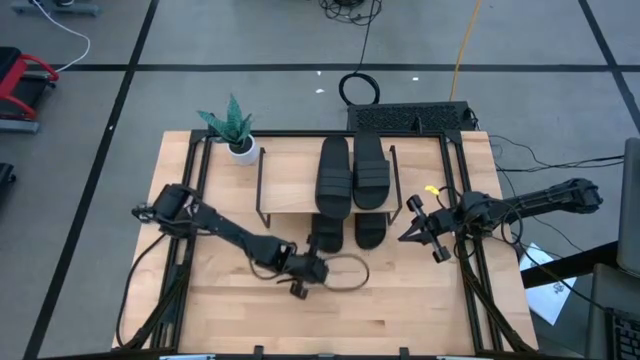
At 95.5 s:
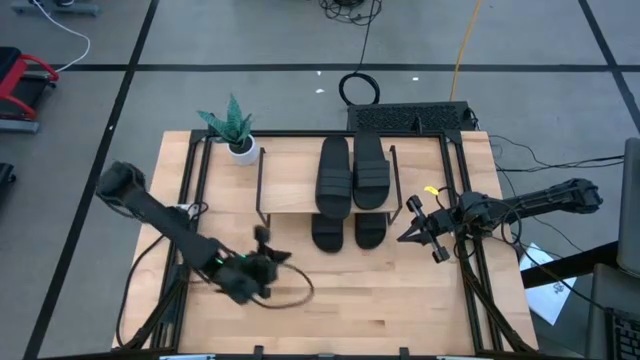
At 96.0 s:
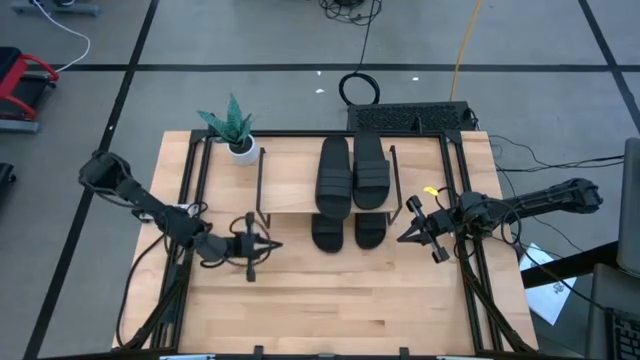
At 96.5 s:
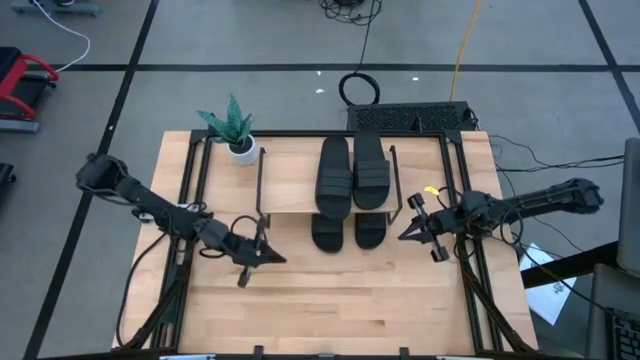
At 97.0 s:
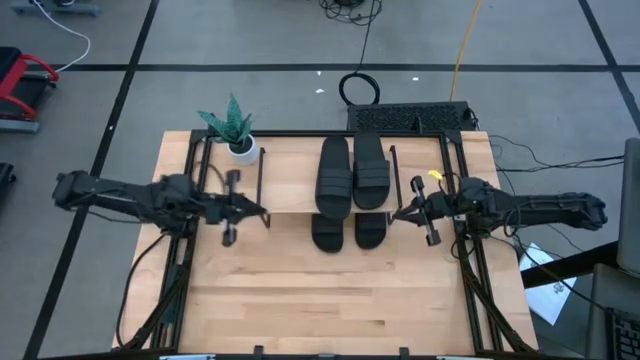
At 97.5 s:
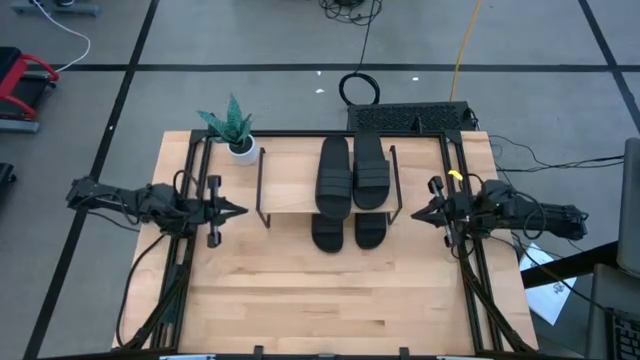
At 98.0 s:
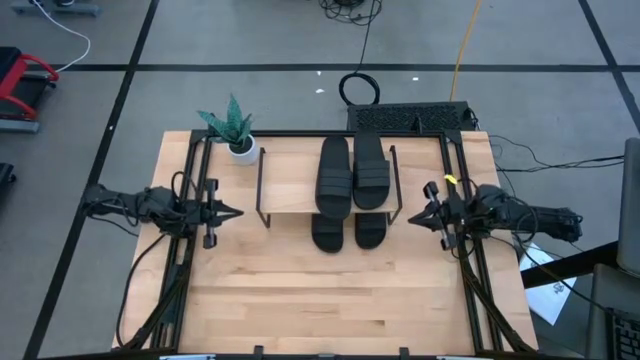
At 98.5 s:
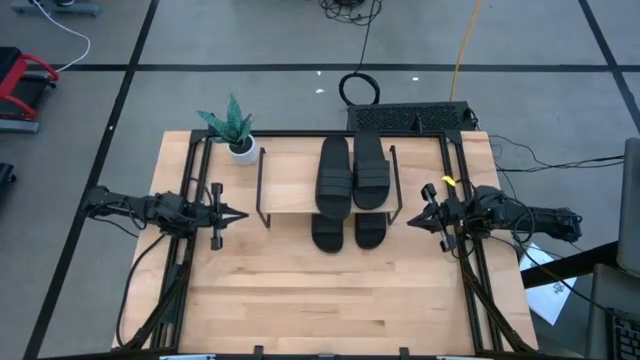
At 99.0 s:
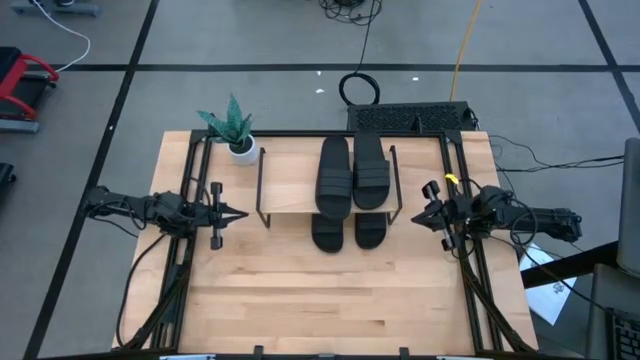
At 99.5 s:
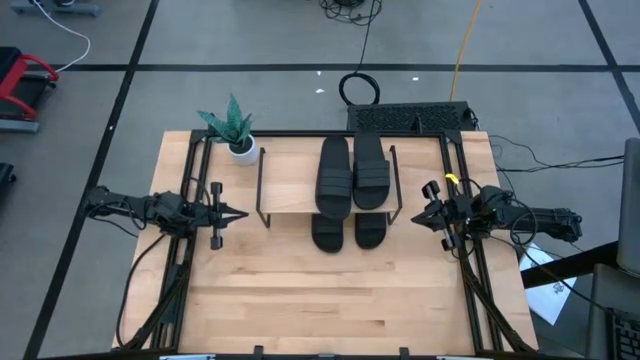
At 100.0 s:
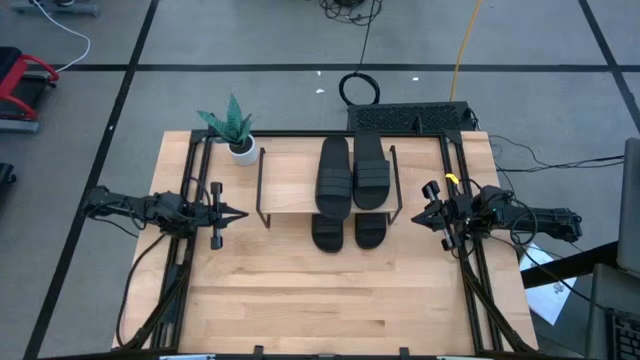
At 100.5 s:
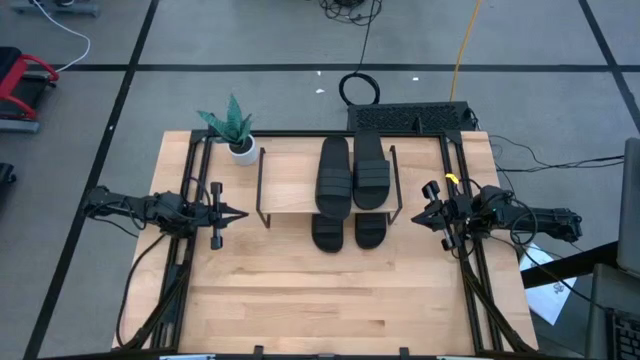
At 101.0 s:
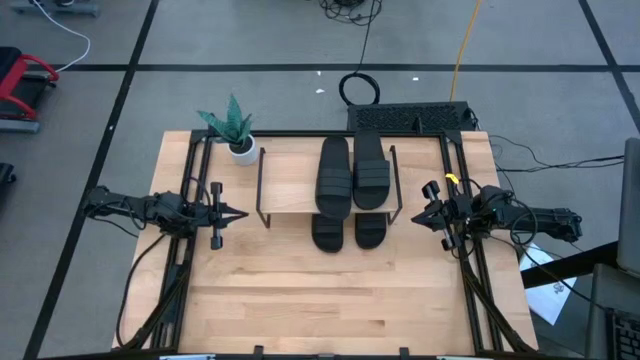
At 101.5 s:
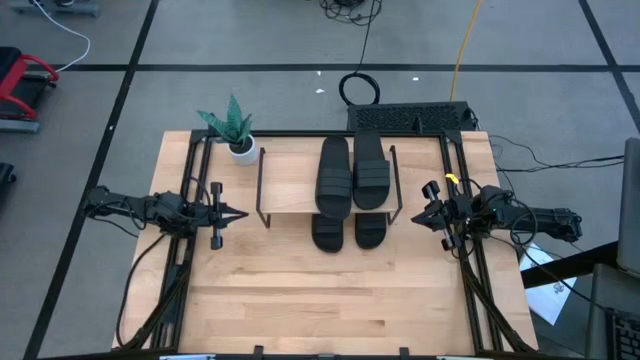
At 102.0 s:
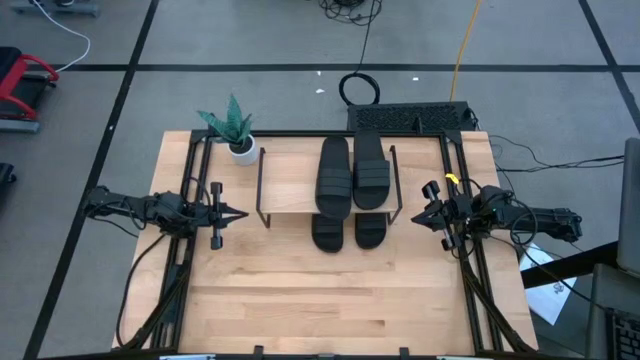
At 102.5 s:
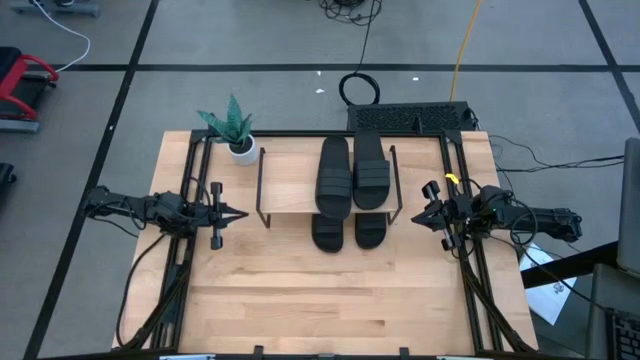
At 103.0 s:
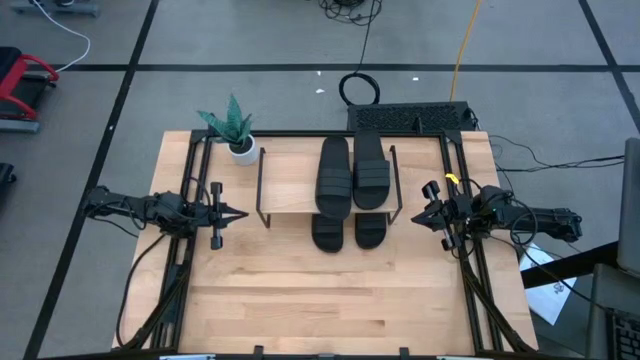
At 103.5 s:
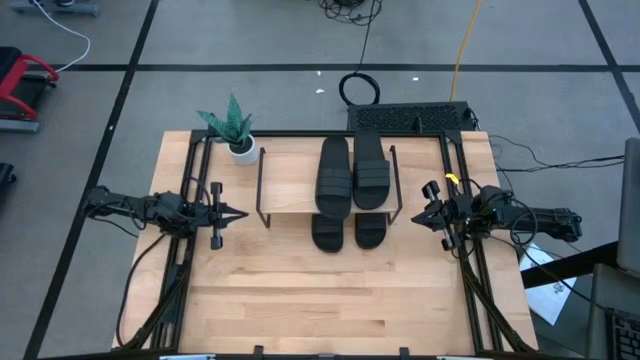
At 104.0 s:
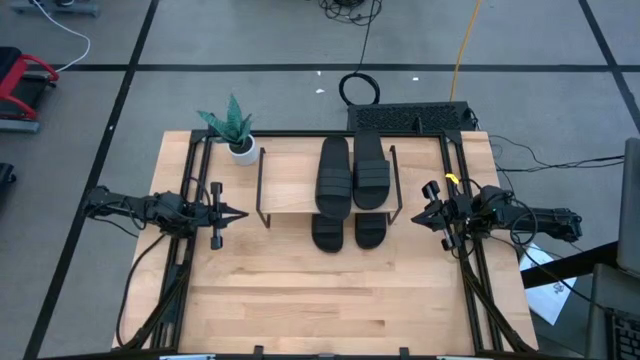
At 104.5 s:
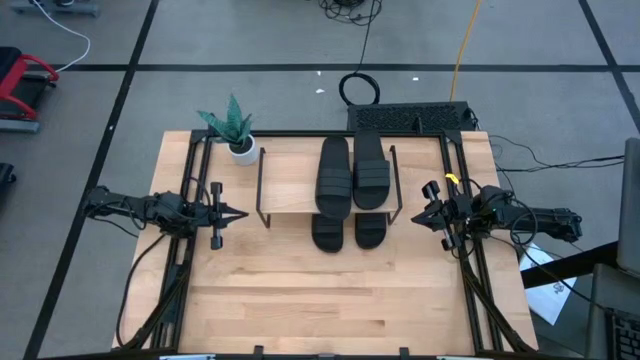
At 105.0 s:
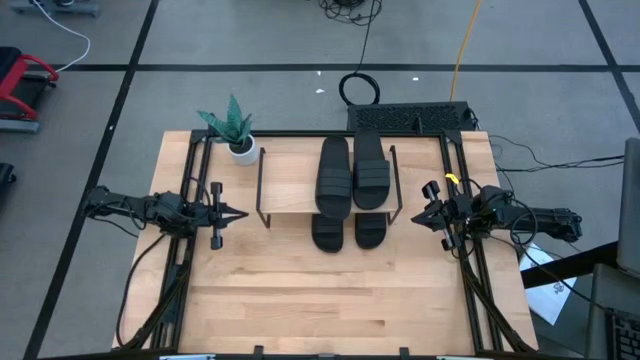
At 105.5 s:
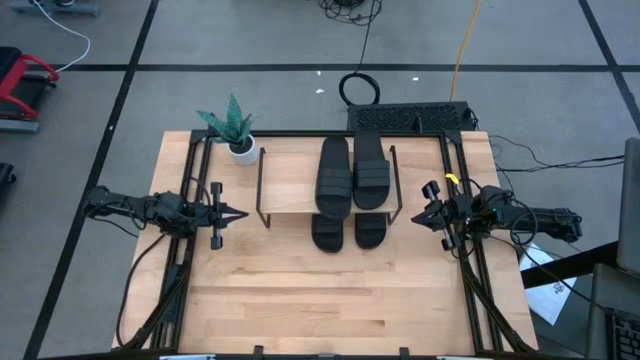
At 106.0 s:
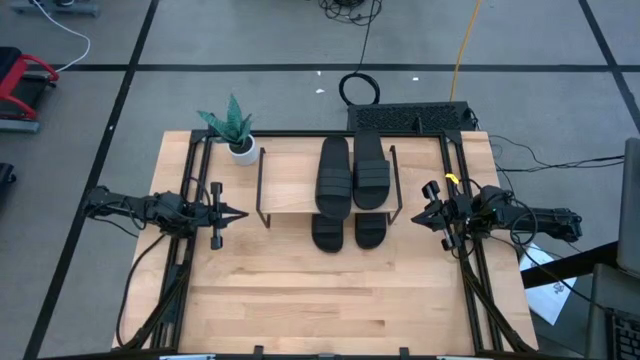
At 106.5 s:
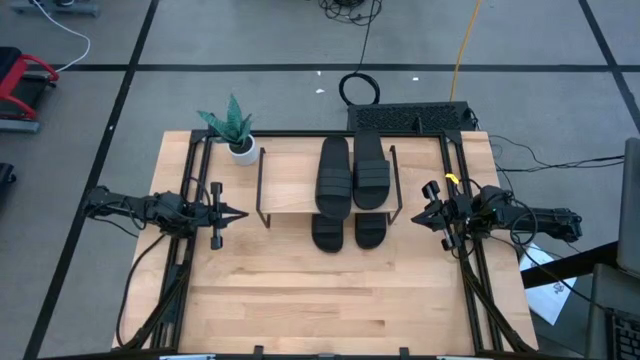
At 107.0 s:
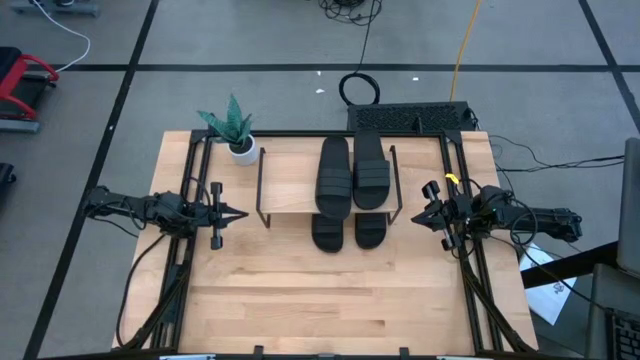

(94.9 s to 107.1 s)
Task: Pick and place slides into the shelf
Return to Home Position

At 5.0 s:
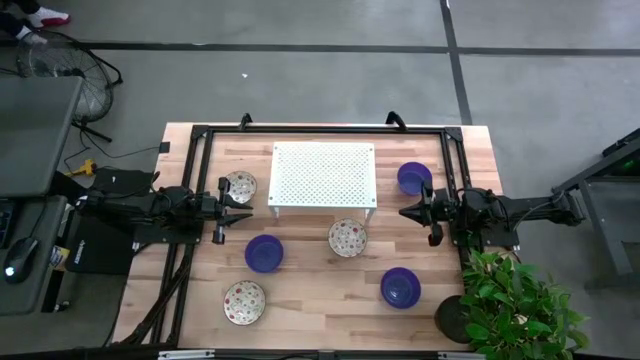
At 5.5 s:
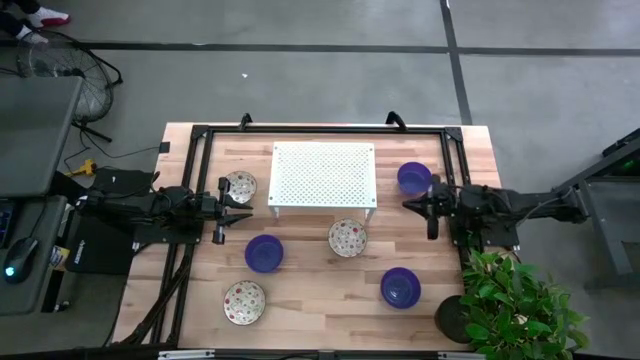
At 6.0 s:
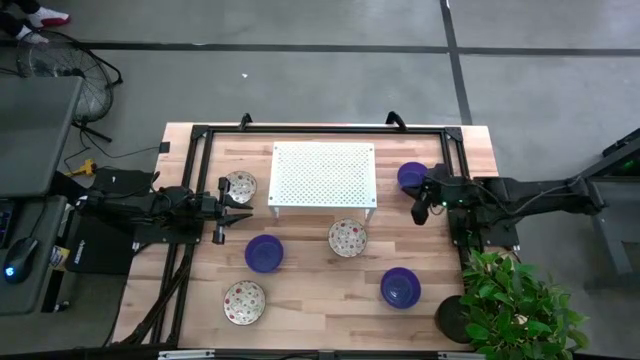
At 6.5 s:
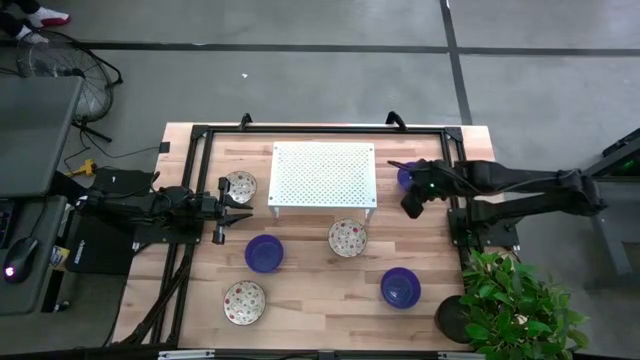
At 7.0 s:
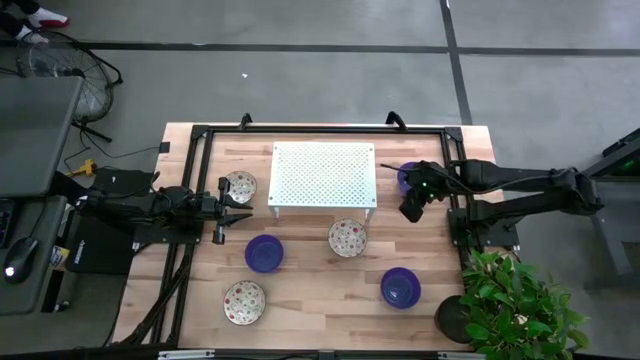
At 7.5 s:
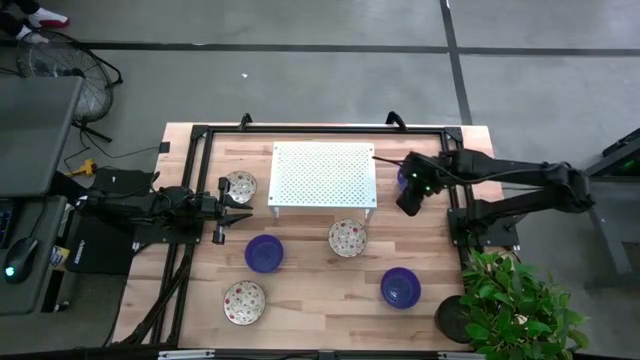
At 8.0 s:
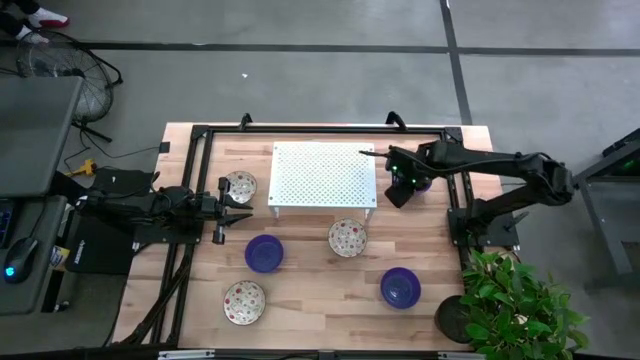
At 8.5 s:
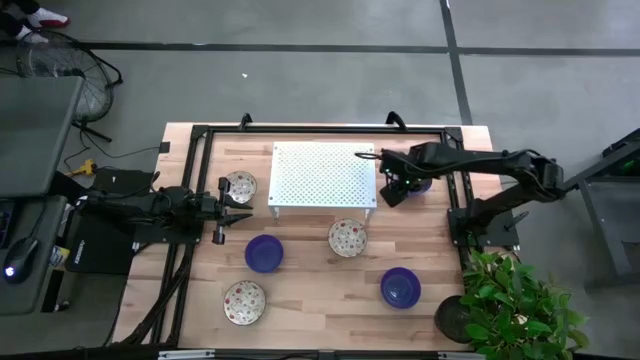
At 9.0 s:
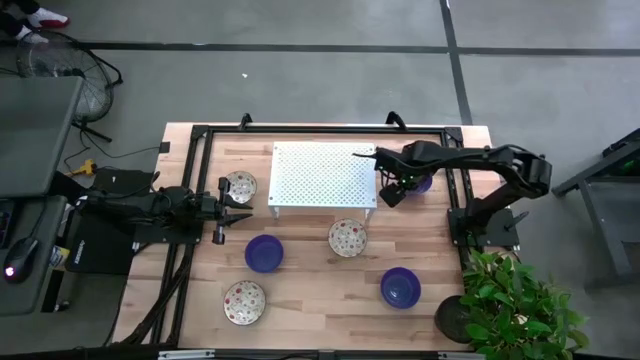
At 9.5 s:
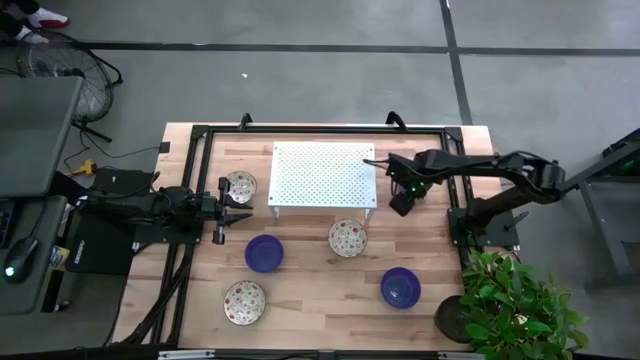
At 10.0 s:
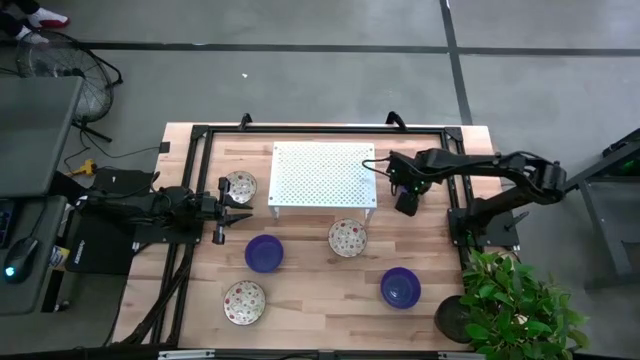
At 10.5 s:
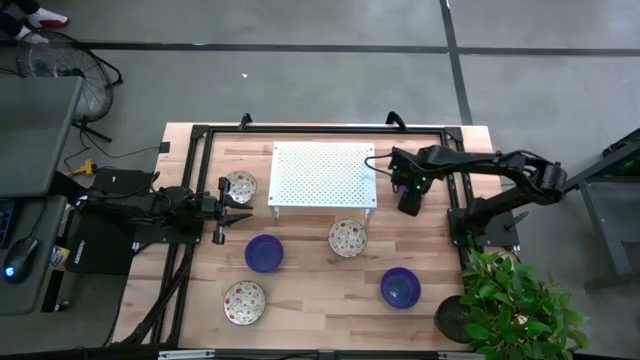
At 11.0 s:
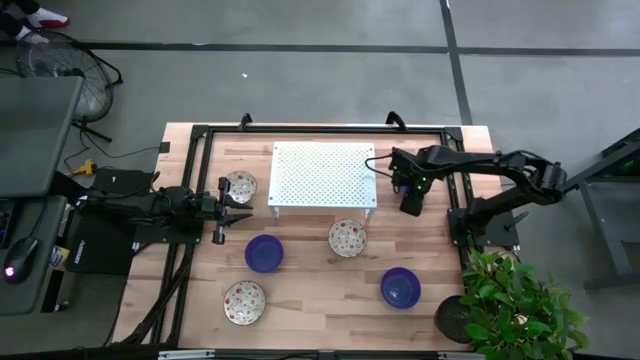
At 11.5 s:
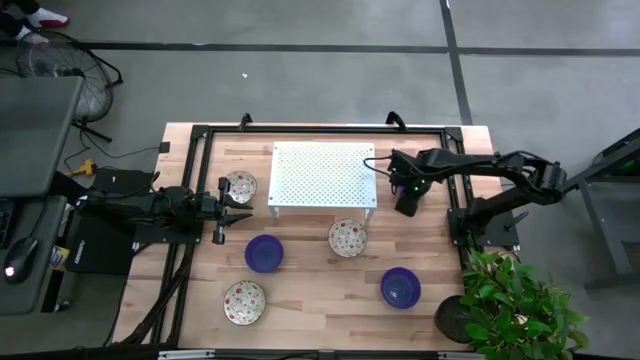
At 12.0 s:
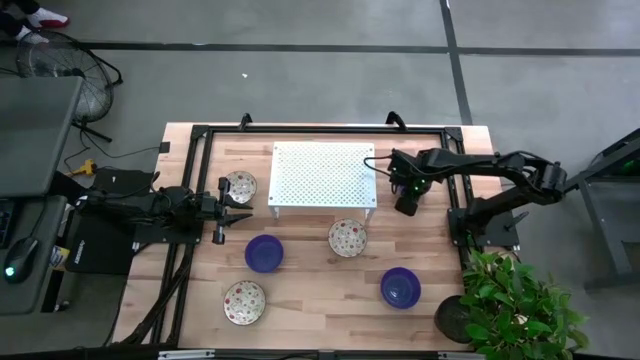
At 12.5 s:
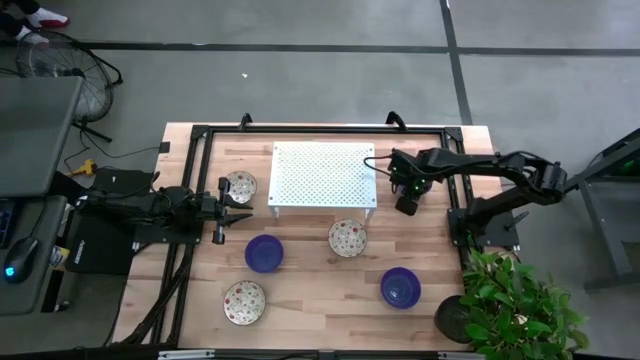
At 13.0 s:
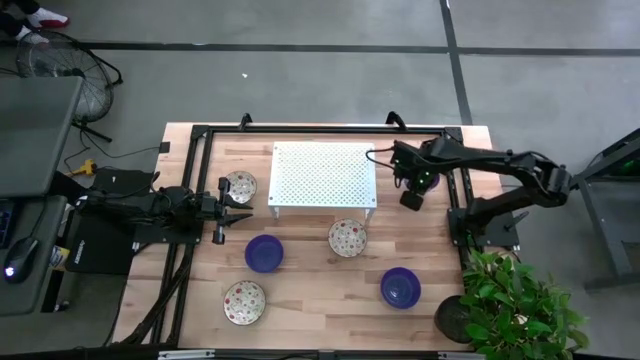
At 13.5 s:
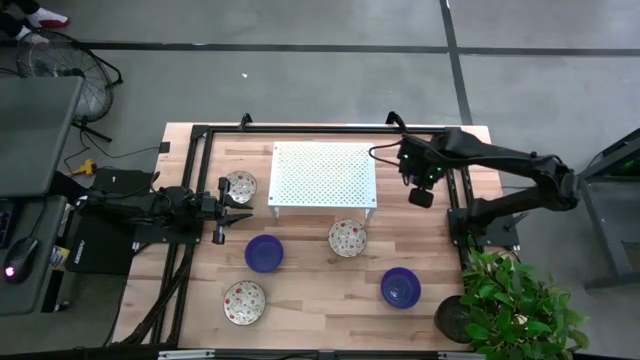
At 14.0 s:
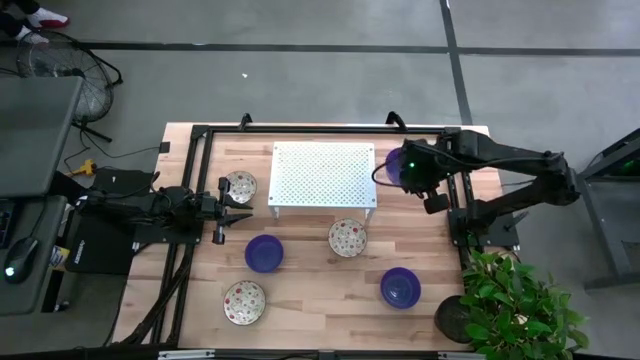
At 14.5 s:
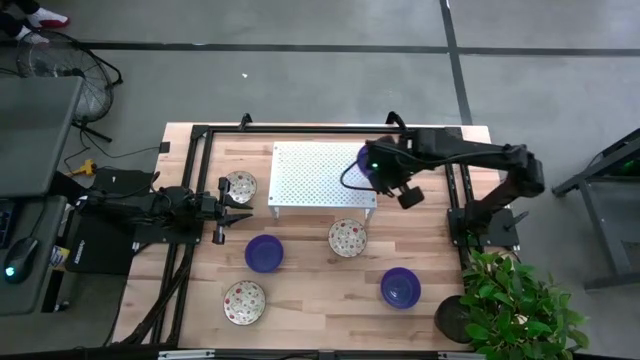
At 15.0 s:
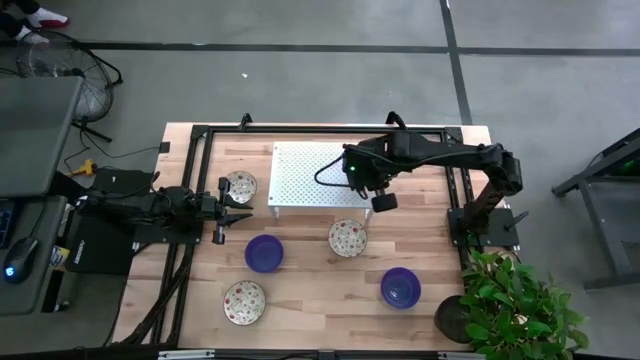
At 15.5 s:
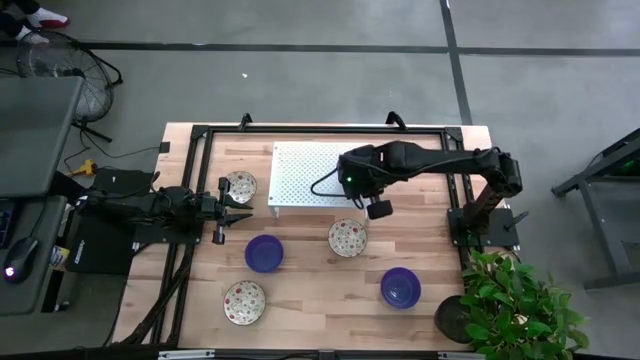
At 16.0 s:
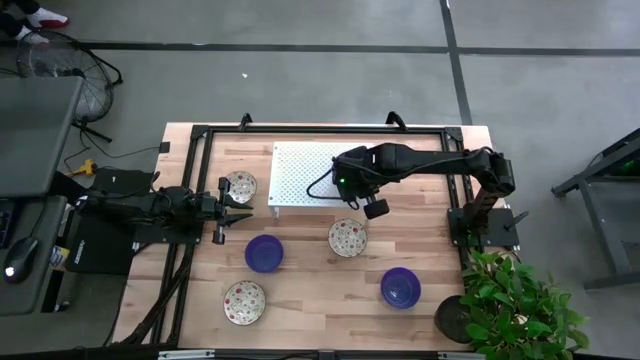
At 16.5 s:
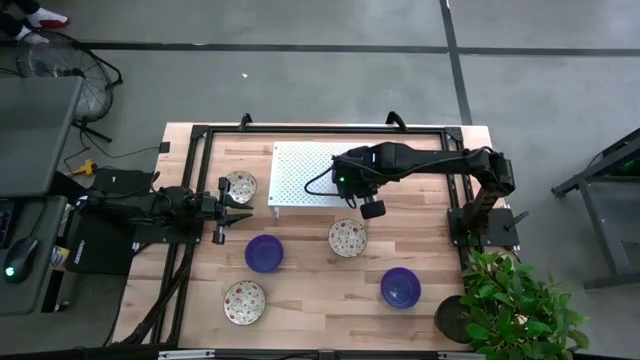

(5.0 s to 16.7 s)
Task: Pick & Place Mini bowls
Put the top right blue bowl on the shelf
